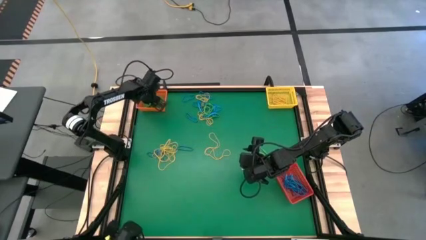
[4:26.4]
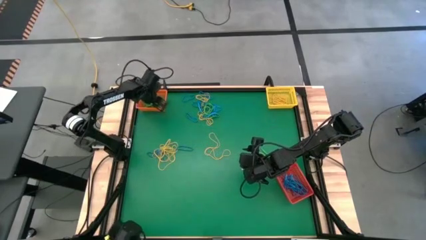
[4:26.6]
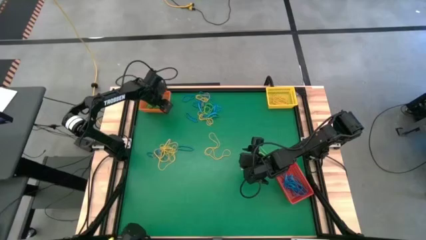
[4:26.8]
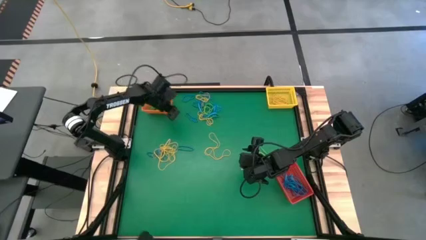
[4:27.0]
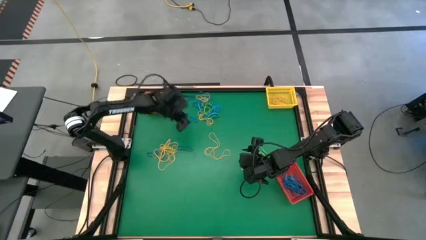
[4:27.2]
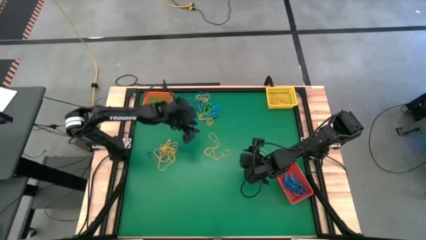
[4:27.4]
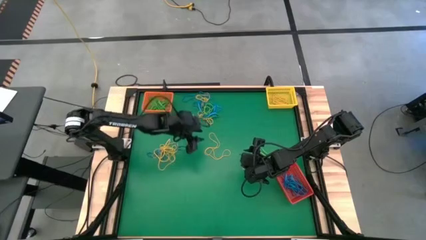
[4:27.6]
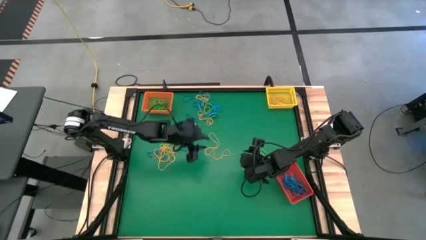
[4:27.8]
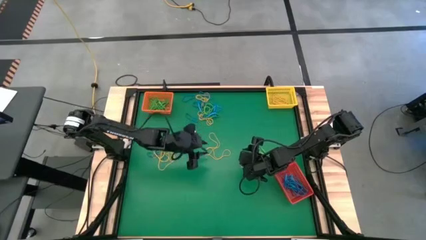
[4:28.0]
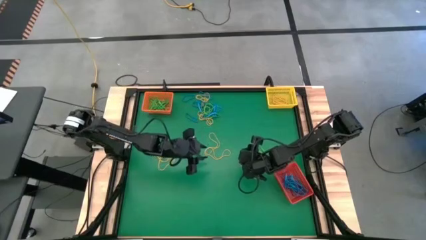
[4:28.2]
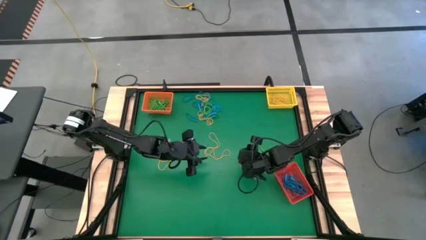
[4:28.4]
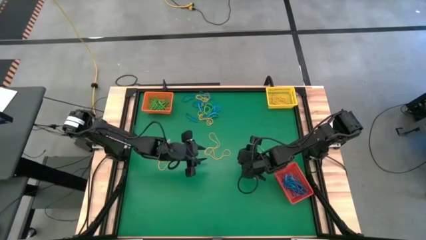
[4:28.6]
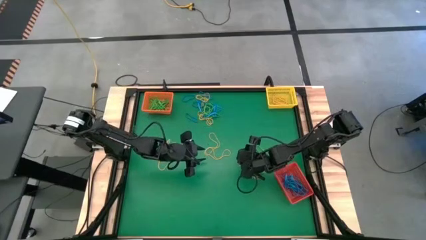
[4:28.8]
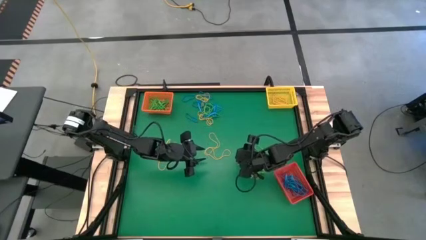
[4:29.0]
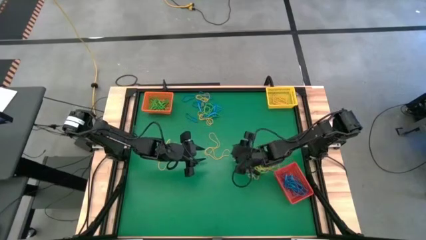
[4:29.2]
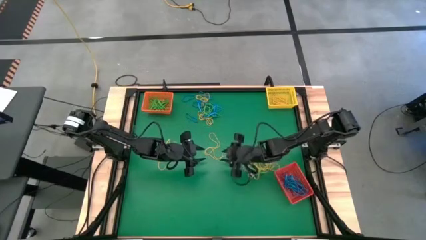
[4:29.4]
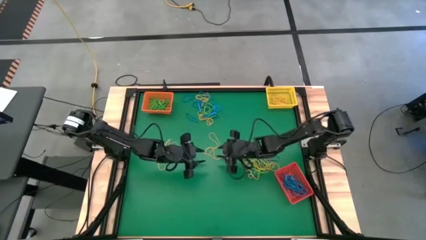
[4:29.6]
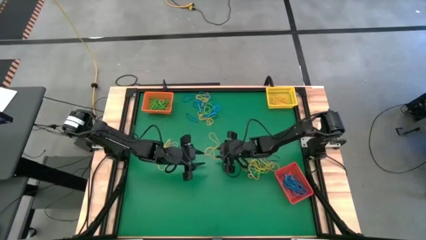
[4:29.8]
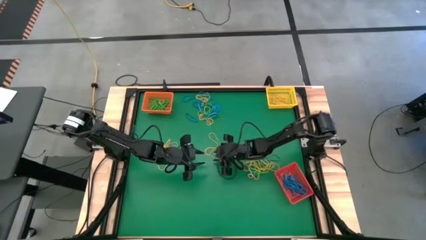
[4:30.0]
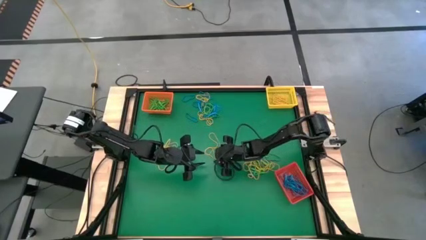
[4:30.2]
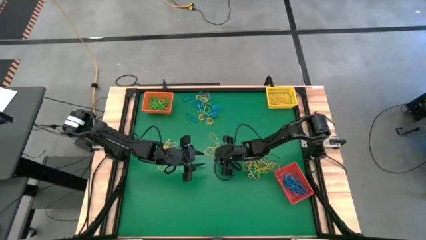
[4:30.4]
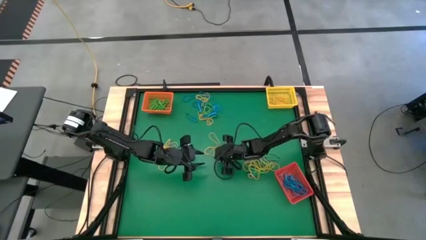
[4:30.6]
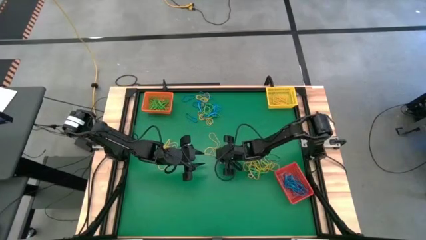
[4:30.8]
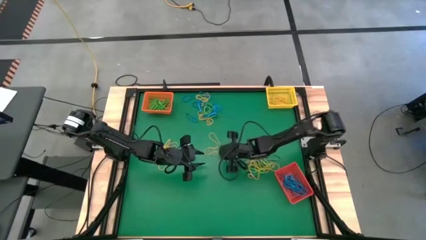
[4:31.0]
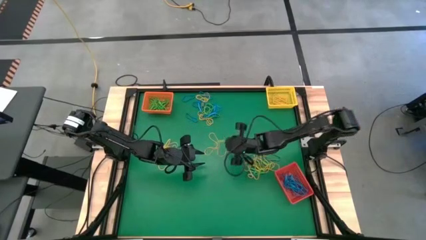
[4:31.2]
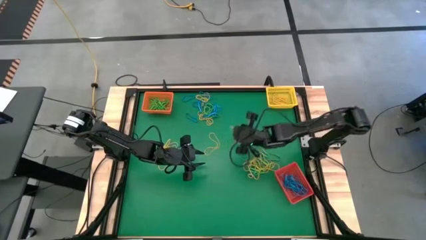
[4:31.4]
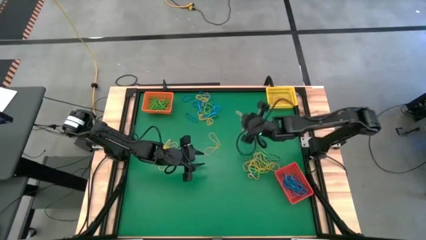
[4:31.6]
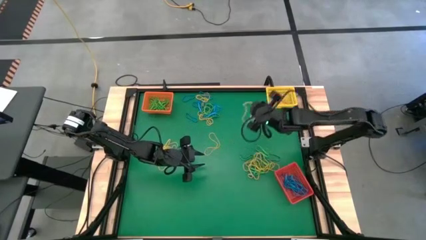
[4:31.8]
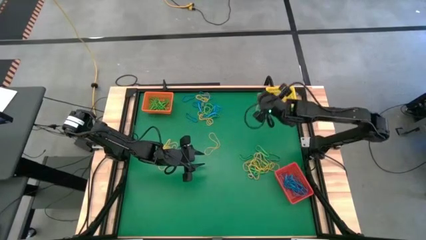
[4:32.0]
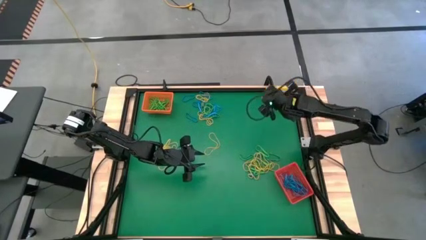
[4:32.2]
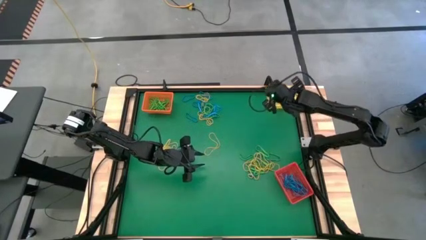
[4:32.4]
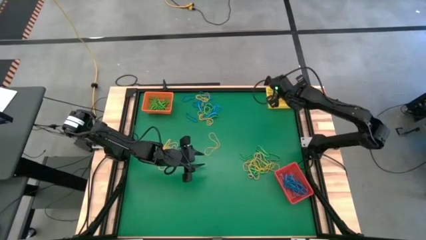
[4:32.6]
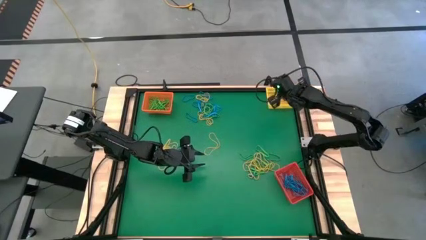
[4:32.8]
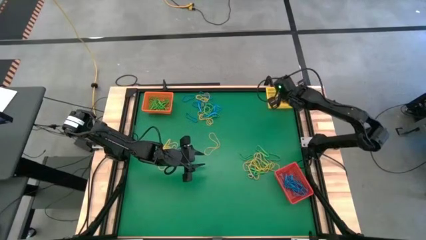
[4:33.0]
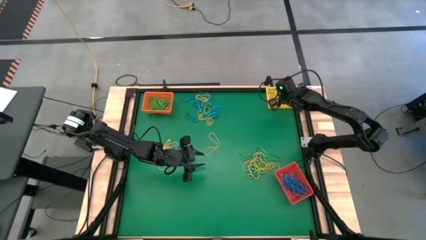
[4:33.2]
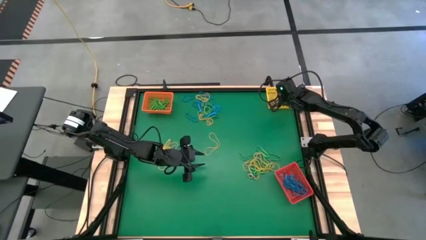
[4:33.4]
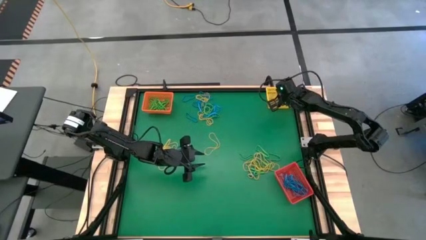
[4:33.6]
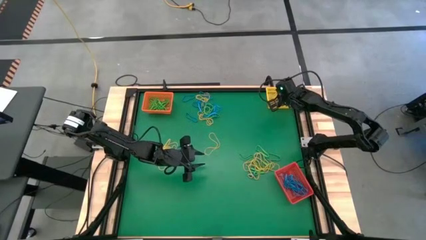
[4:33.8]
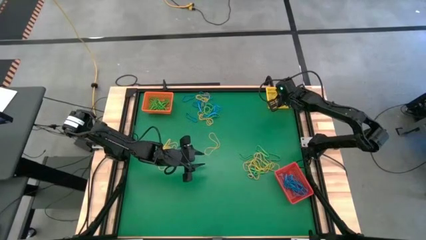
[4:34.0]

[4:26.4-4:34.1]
Task: Sort rubber bands into baskets
Put the yellow rubber band into the yellow bin

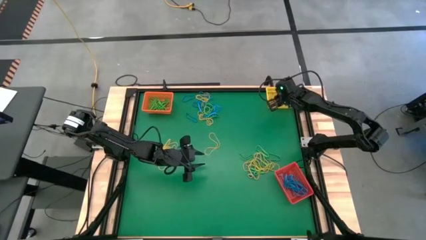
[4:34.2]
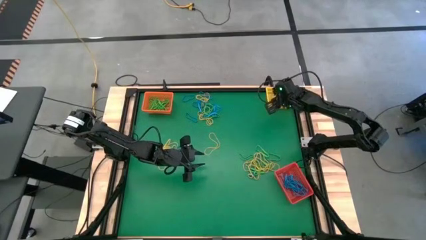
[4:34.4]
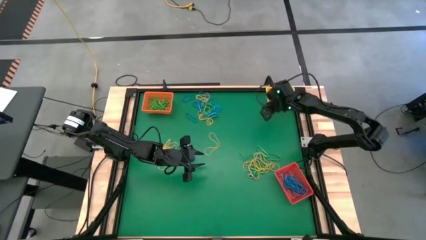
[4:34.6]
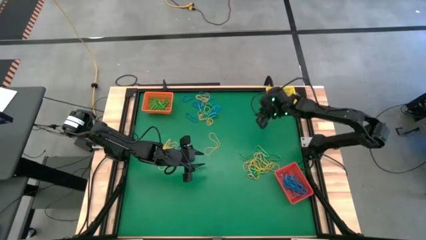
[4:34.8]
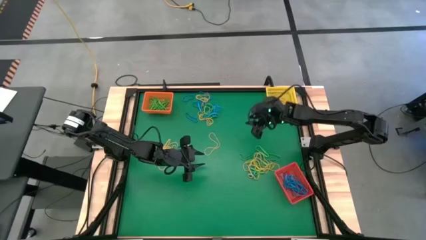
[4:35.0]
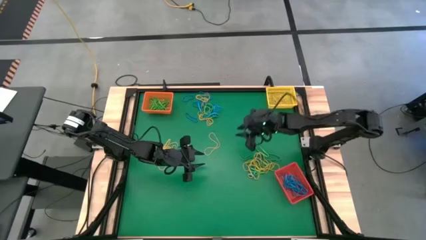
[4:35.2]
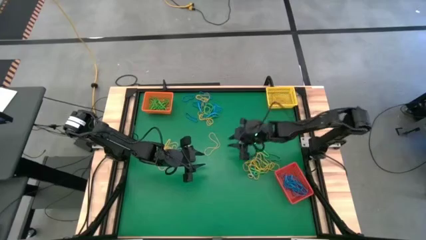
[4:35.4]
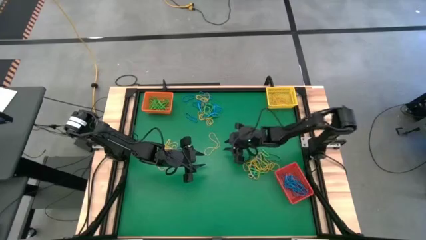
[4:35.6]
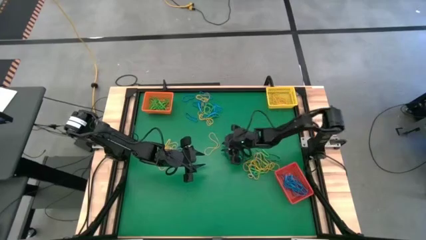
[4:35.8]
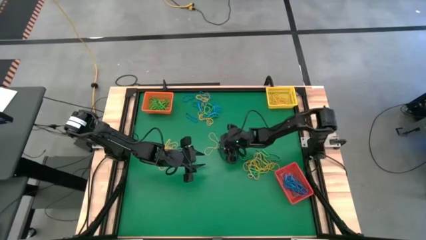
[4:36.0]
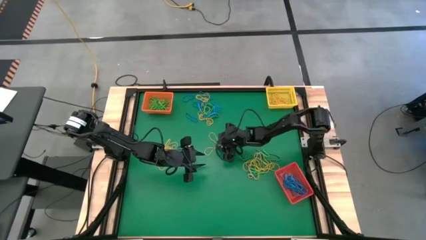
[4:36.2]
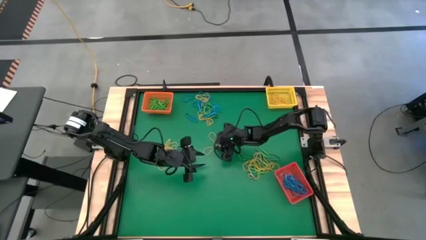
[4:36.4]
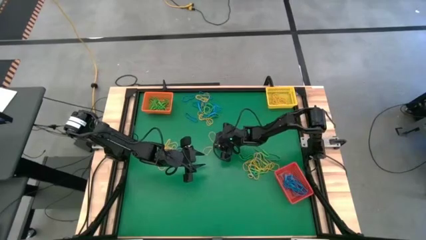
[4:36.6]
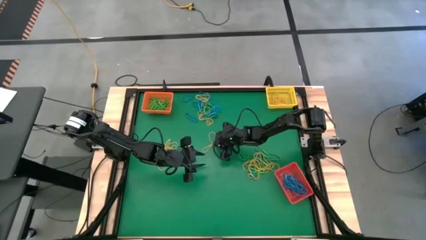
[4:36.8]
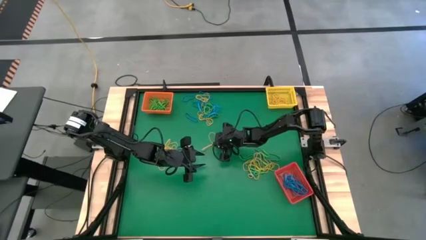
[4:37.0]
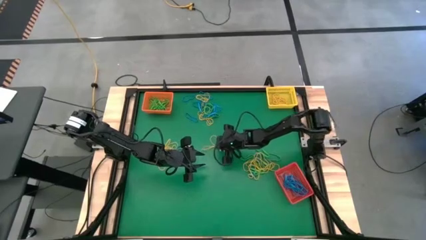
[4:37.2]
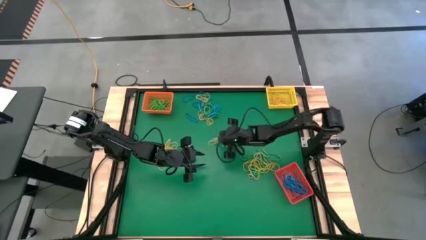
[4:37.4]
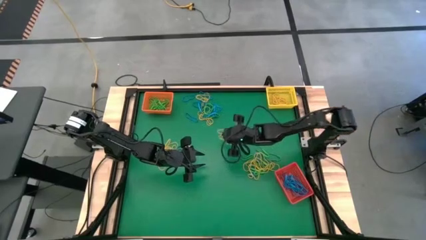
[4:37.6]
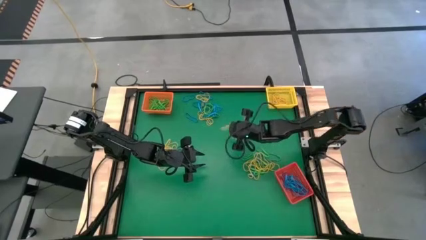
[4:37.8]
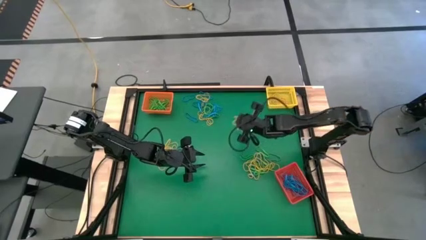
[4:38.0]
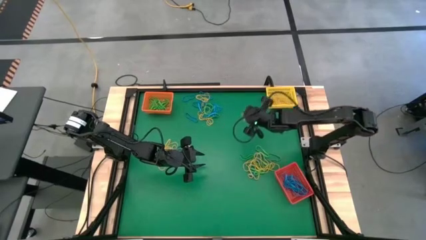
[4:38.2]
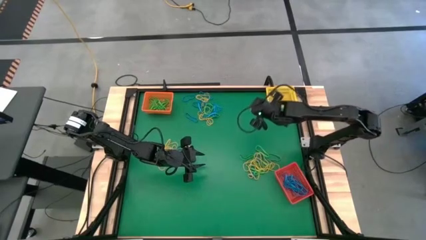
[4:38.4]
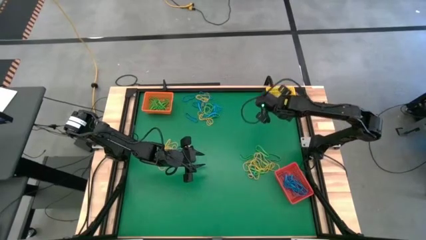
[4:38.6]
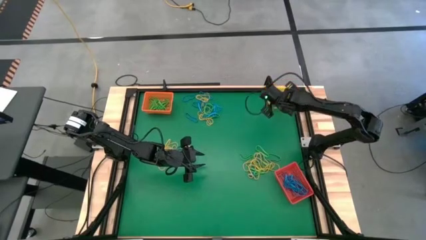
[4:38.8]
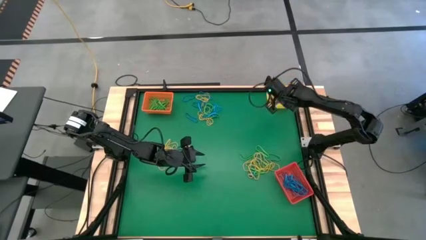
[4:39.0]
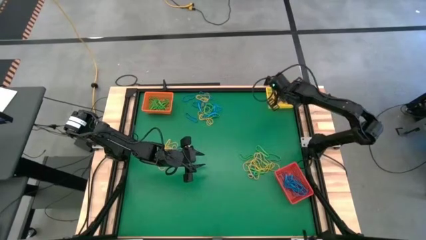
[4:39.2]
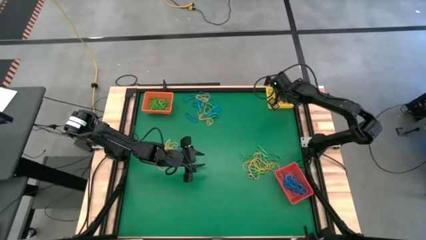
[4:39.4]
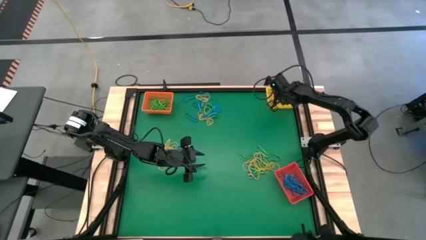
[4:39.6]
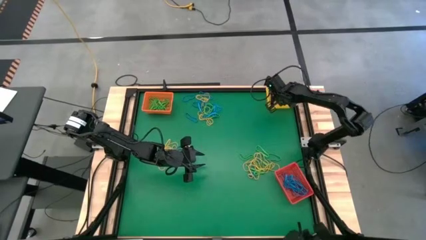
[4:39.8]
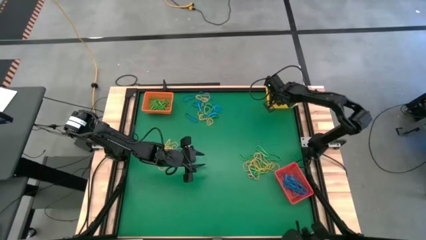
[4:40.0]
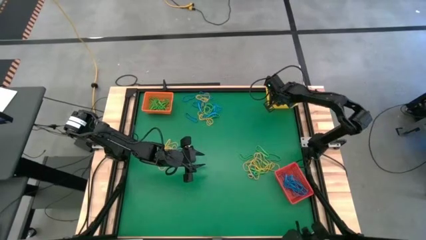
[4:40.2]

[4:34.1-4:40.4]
Put the yellow rubber band into the yellow bin

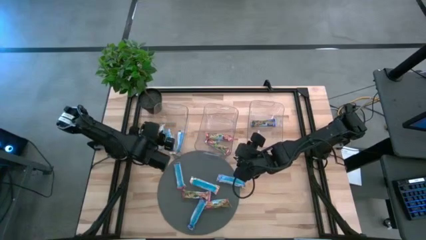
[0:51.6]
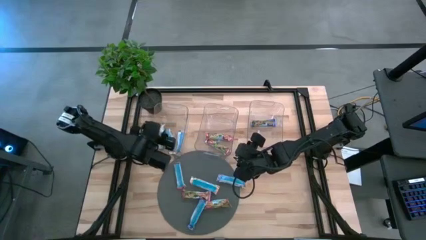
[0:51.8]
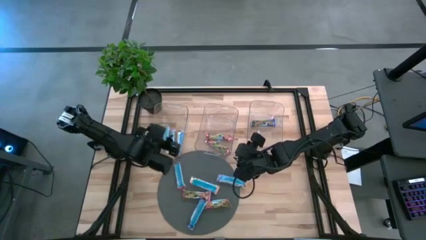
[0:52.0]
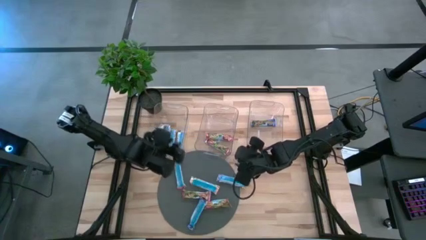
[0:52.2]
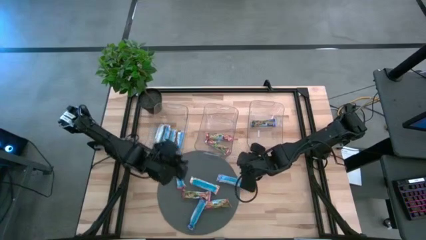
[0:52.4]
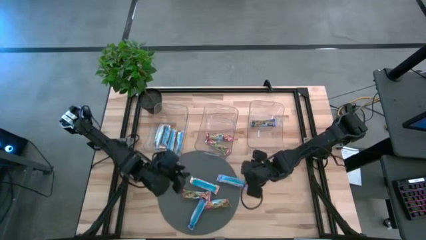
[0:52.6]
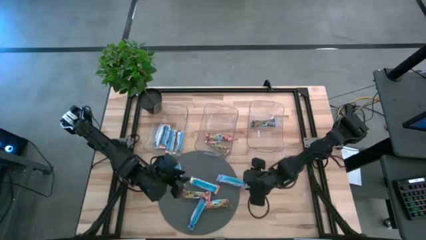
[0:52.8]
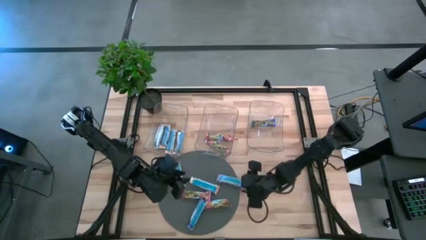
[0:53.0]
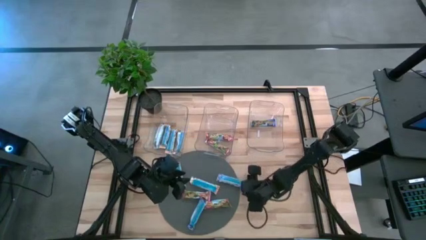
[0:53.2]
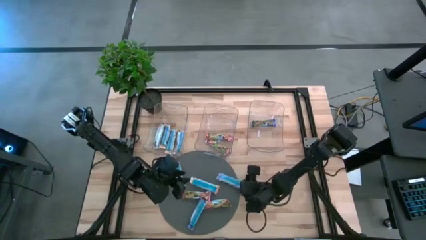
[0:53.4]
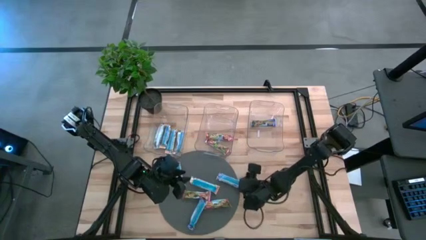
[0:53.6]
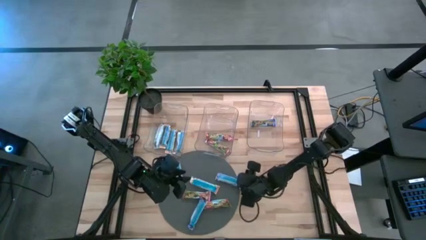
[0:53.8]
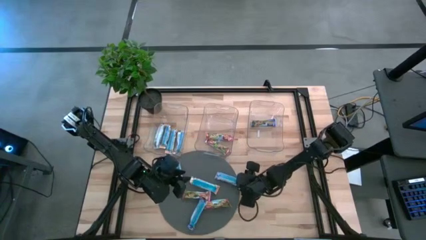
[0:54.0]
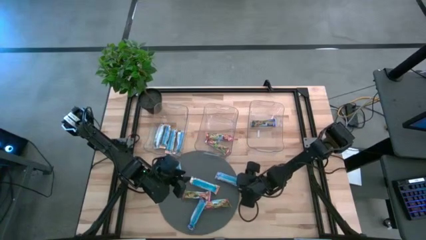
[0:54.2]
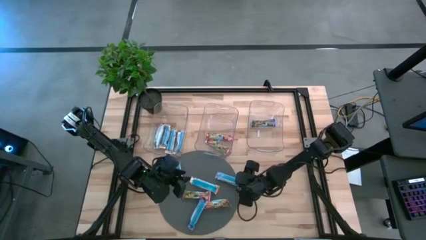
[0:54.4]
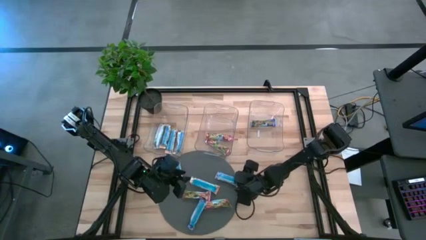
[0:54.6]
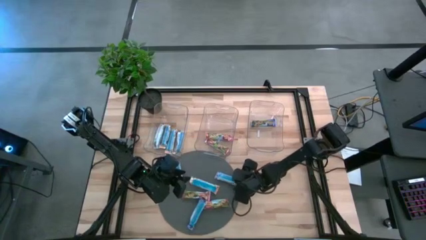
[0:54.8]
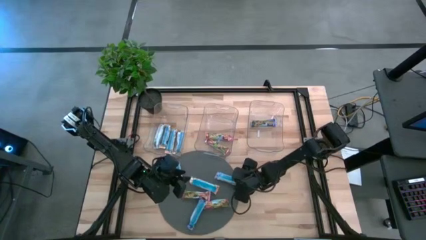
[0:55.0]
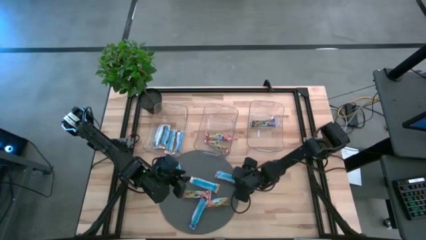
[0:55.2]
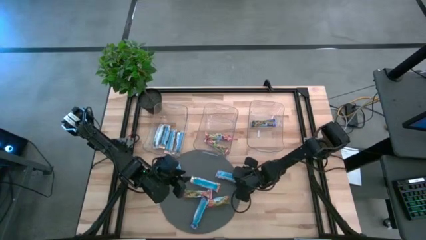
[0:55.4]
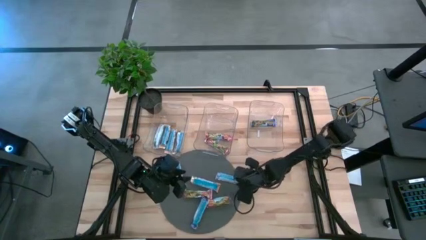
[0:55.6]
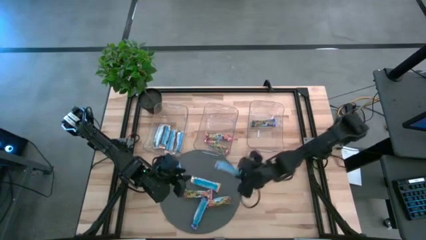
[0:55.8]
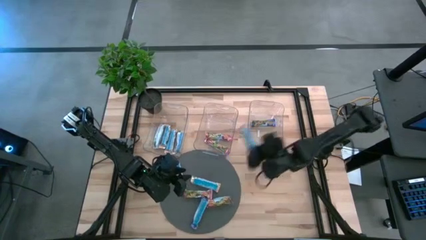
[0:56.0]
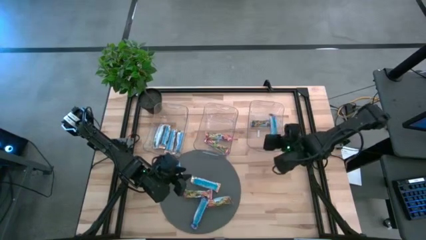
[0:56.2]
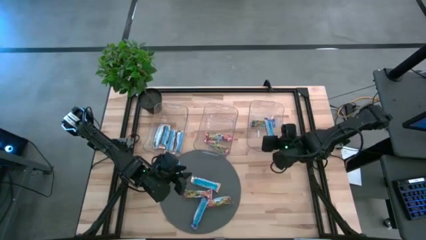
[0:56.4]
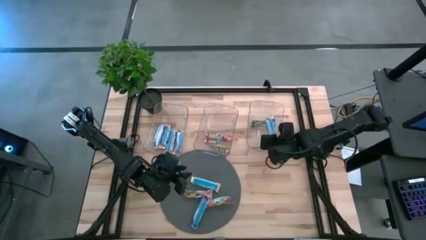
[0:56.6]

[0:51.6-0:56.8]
Task: Pick and place Granola Bars by type
Put the blue granola bar into the right transparent bin
